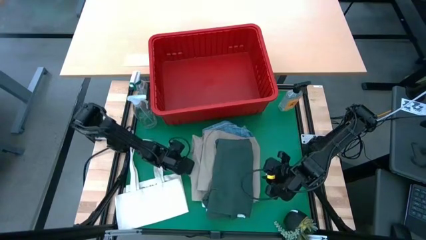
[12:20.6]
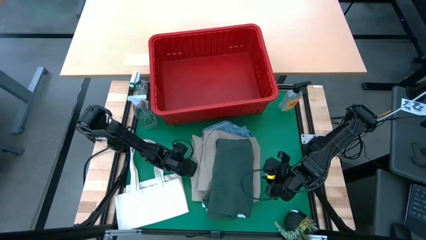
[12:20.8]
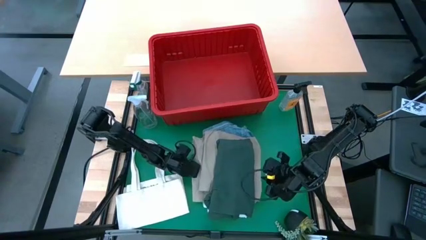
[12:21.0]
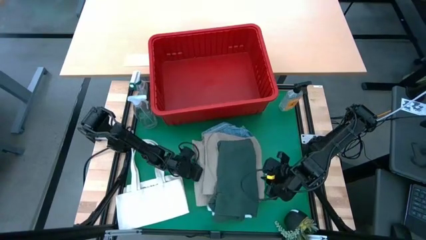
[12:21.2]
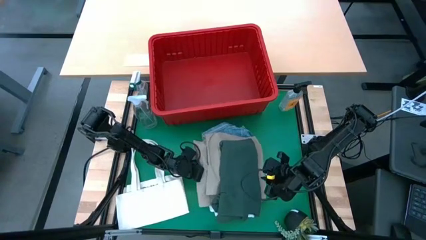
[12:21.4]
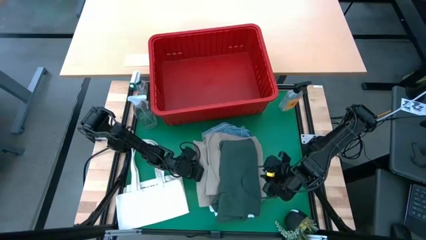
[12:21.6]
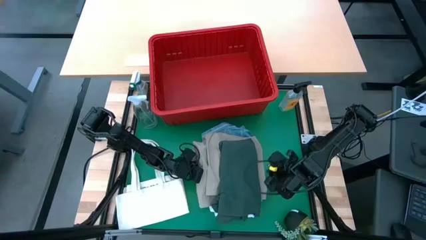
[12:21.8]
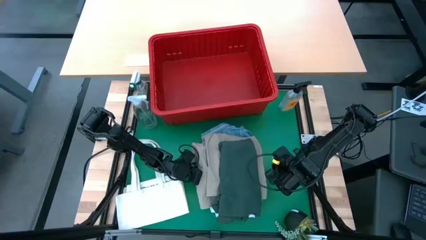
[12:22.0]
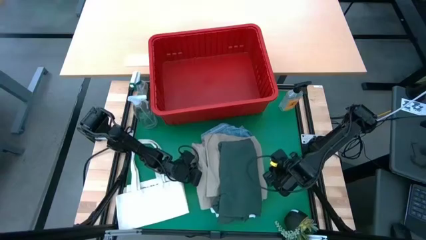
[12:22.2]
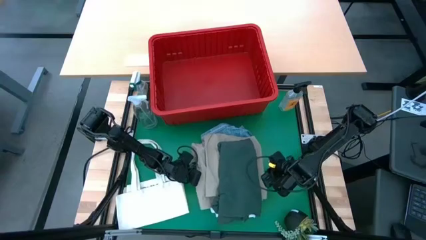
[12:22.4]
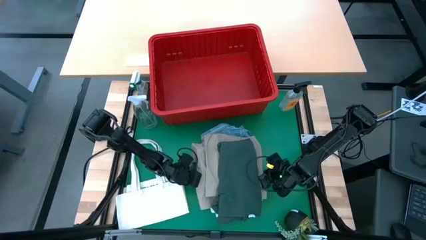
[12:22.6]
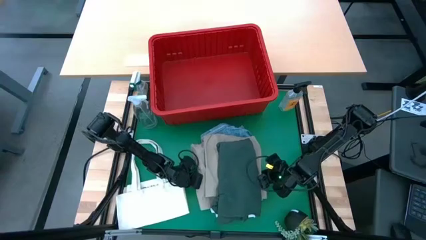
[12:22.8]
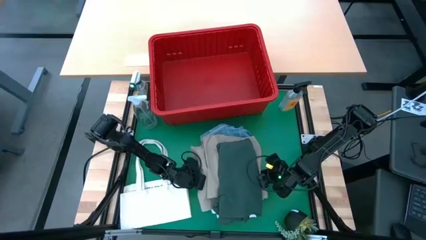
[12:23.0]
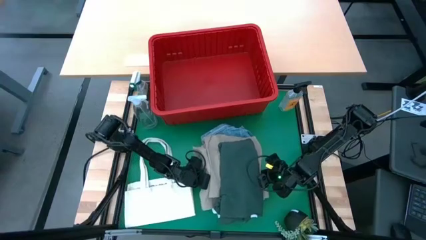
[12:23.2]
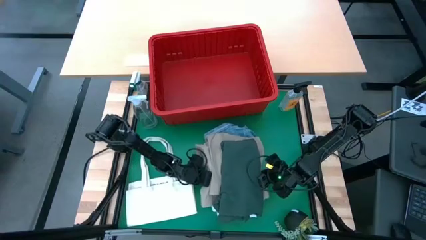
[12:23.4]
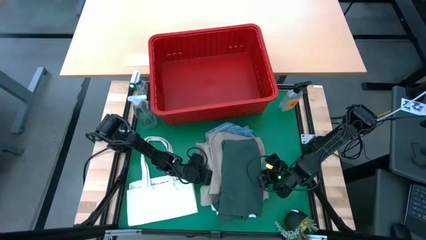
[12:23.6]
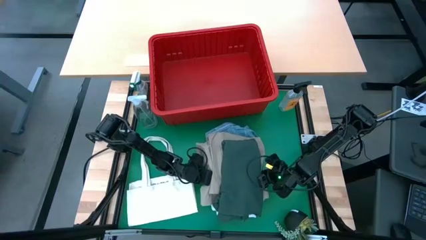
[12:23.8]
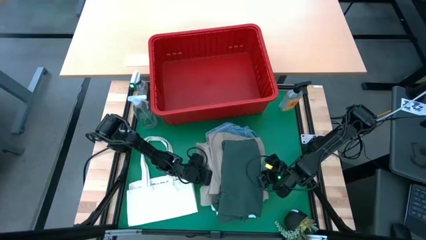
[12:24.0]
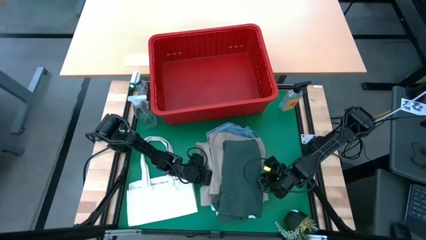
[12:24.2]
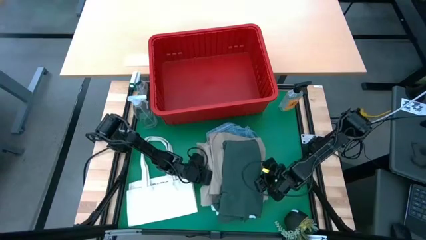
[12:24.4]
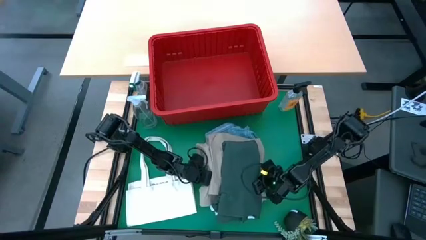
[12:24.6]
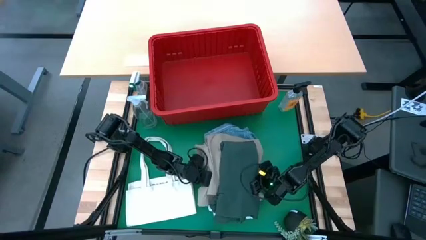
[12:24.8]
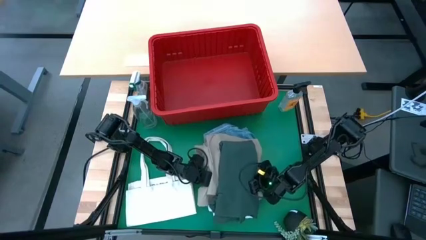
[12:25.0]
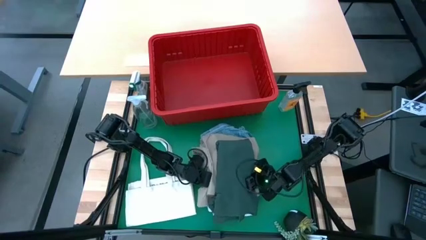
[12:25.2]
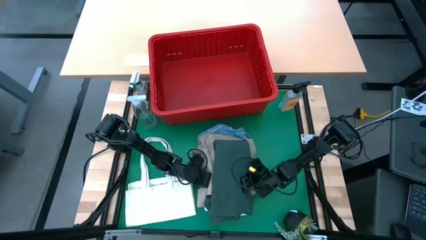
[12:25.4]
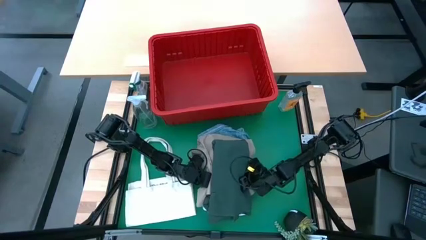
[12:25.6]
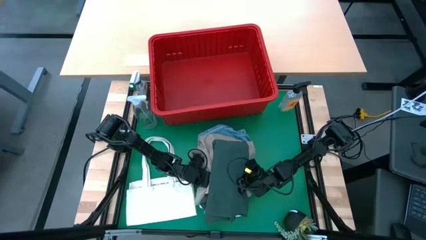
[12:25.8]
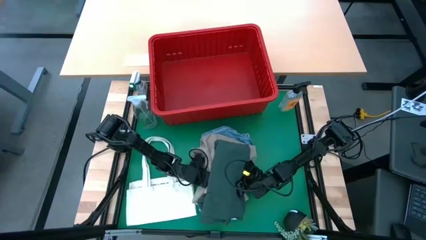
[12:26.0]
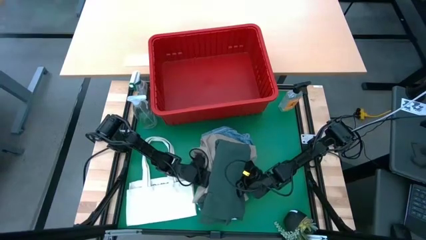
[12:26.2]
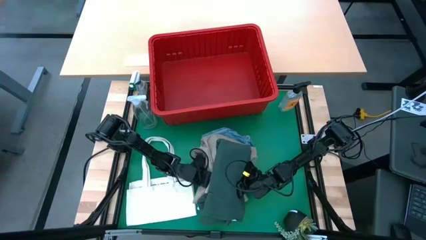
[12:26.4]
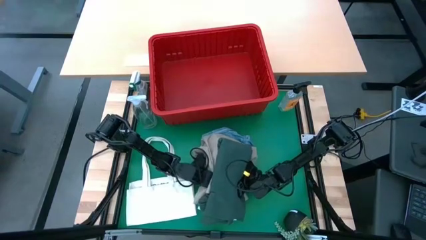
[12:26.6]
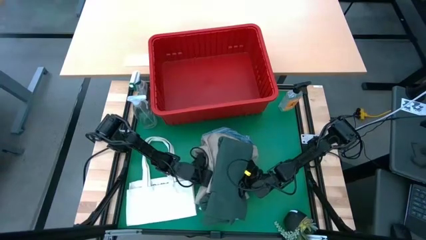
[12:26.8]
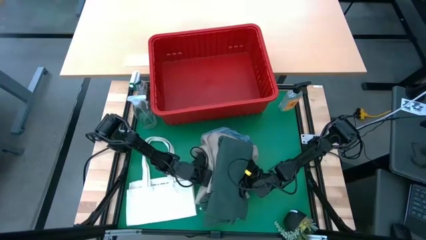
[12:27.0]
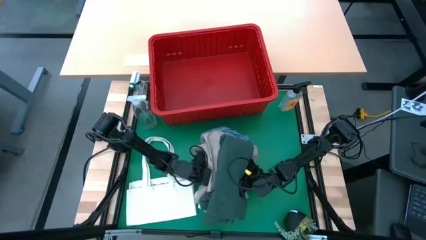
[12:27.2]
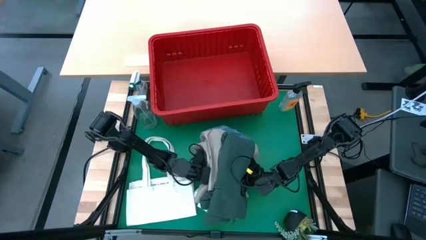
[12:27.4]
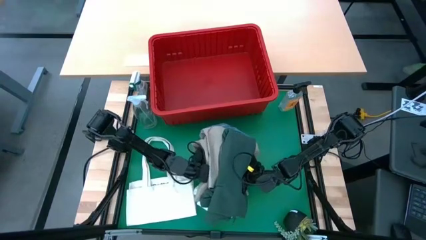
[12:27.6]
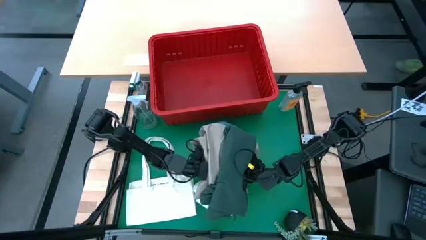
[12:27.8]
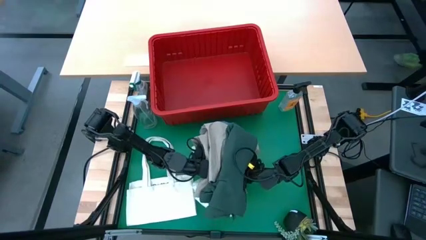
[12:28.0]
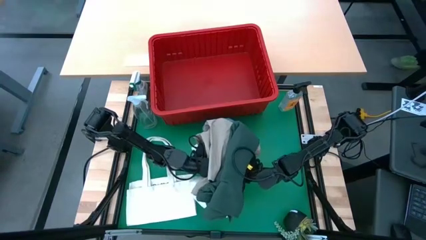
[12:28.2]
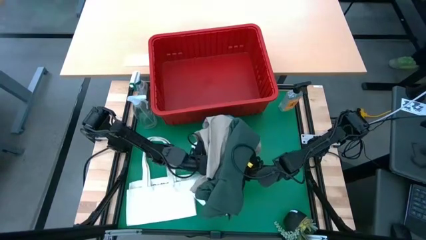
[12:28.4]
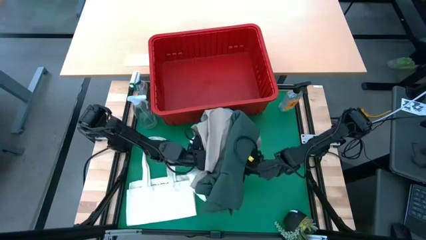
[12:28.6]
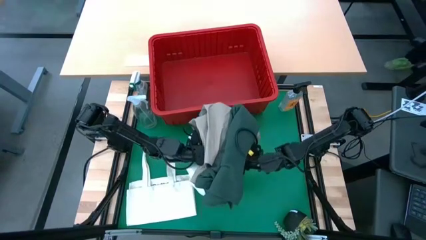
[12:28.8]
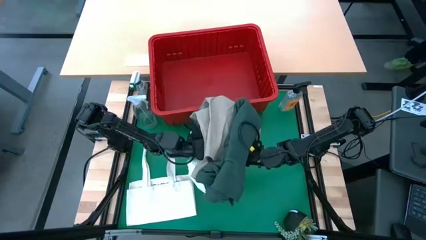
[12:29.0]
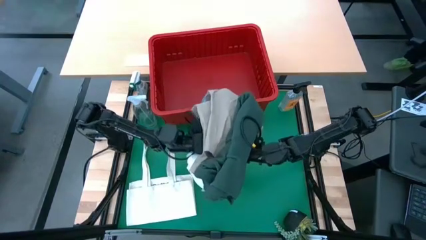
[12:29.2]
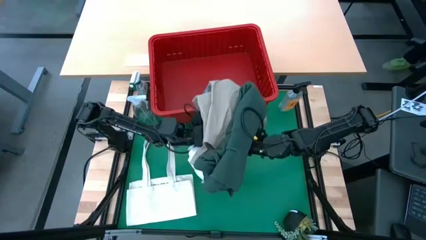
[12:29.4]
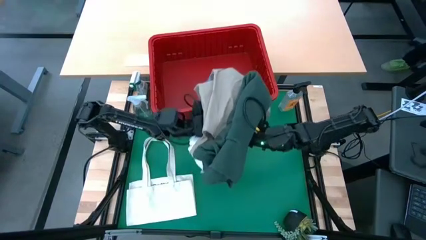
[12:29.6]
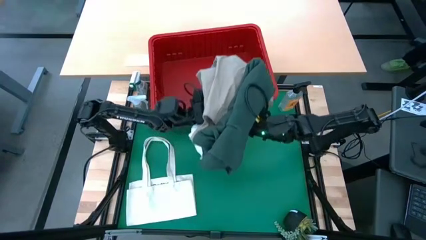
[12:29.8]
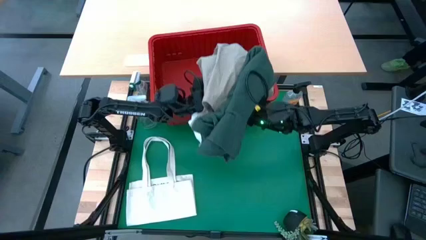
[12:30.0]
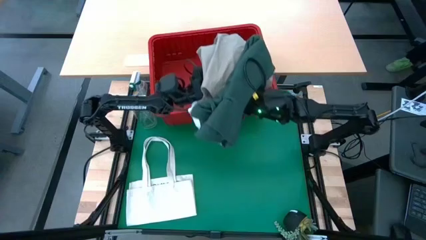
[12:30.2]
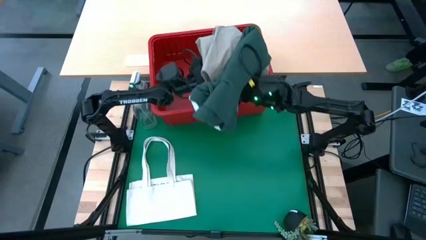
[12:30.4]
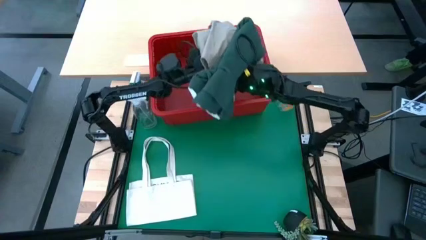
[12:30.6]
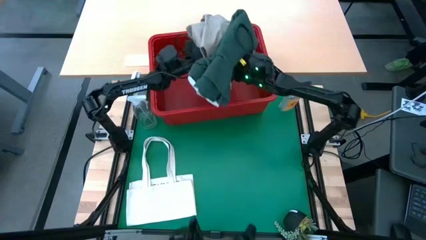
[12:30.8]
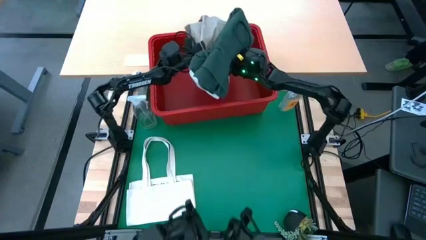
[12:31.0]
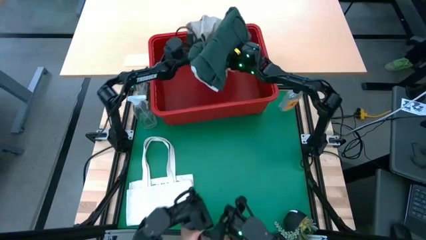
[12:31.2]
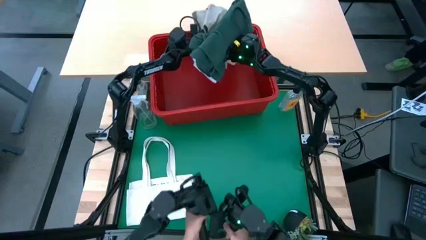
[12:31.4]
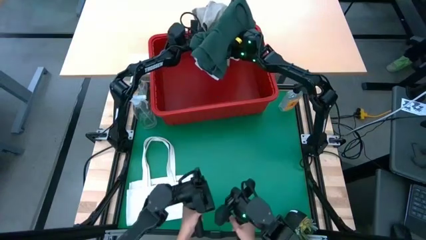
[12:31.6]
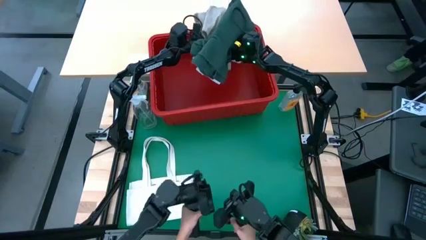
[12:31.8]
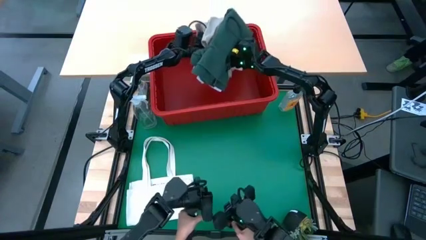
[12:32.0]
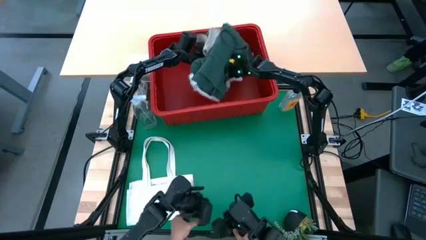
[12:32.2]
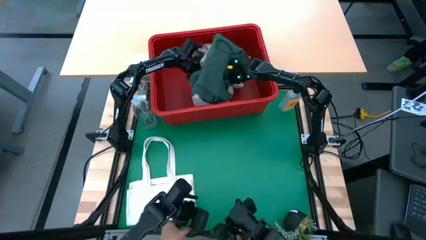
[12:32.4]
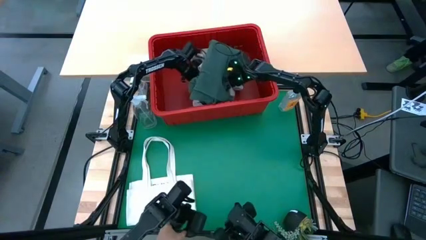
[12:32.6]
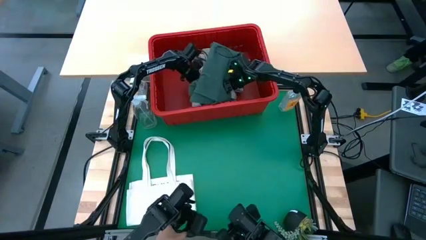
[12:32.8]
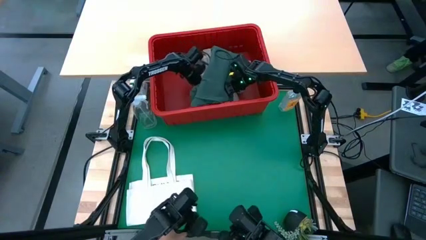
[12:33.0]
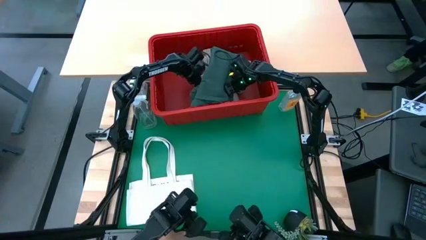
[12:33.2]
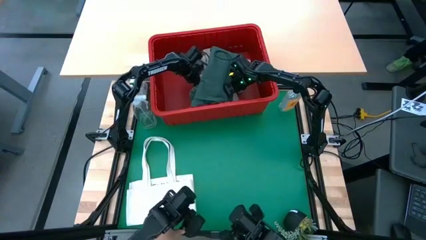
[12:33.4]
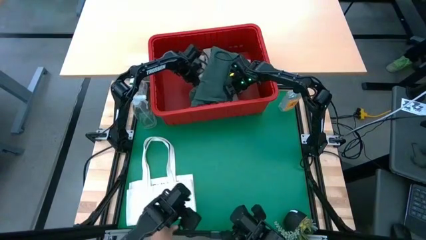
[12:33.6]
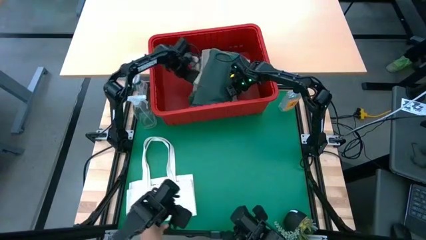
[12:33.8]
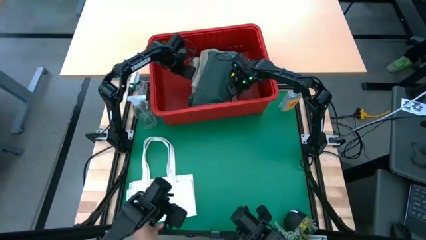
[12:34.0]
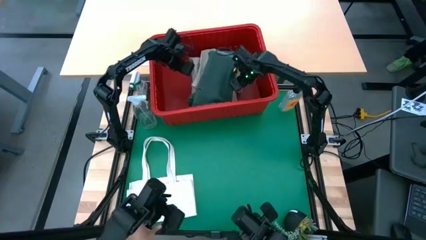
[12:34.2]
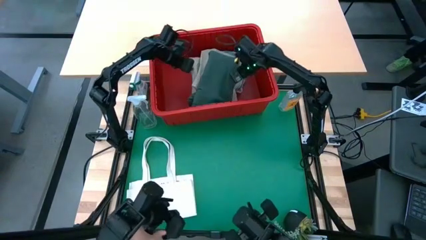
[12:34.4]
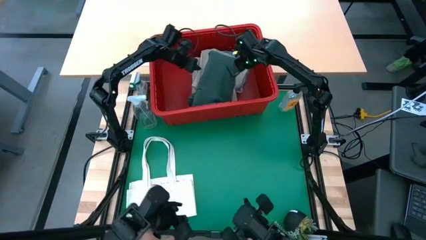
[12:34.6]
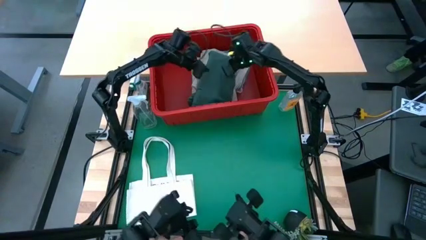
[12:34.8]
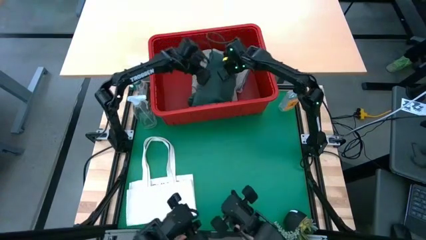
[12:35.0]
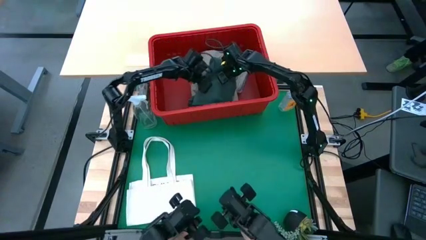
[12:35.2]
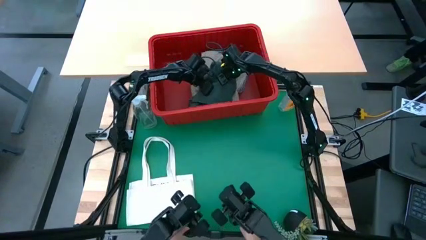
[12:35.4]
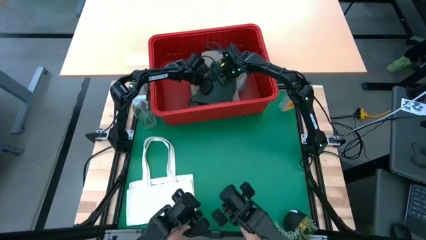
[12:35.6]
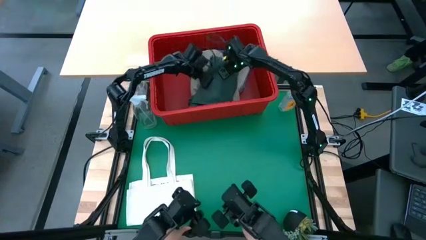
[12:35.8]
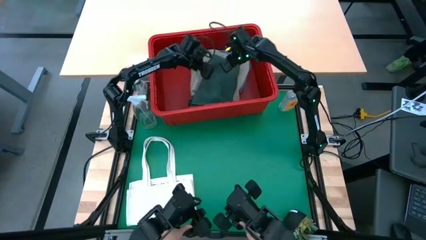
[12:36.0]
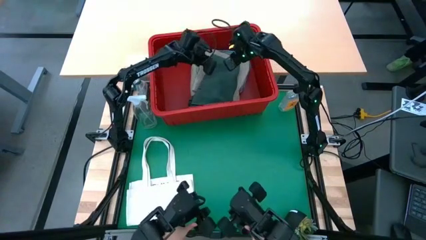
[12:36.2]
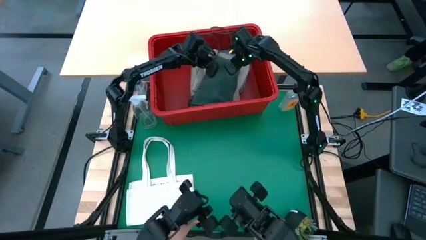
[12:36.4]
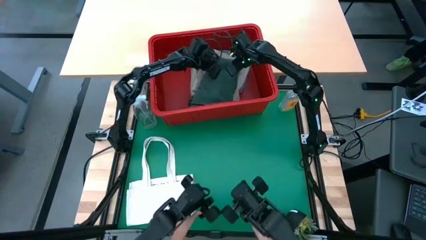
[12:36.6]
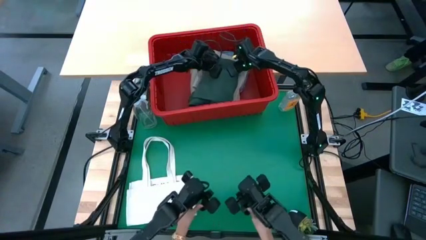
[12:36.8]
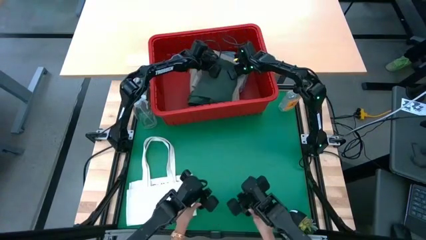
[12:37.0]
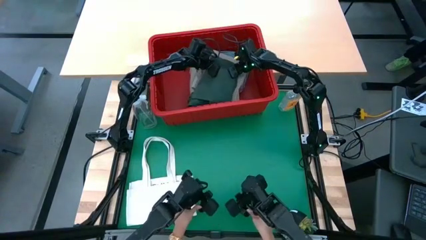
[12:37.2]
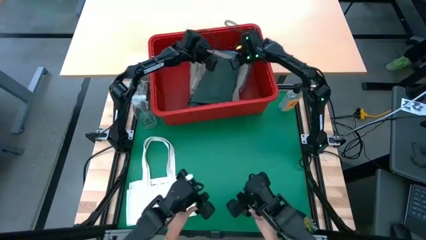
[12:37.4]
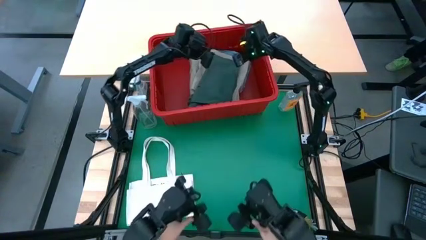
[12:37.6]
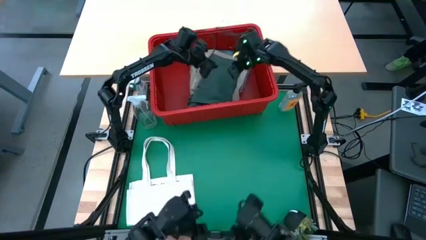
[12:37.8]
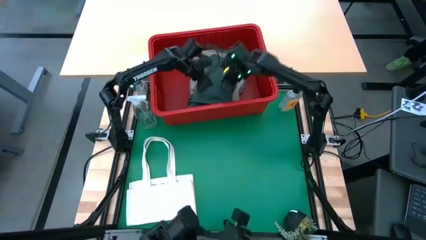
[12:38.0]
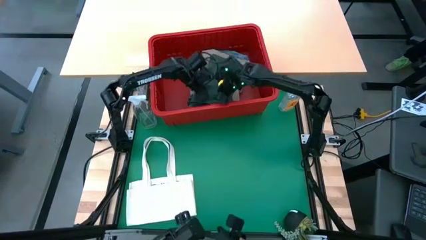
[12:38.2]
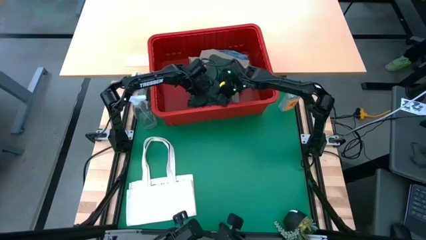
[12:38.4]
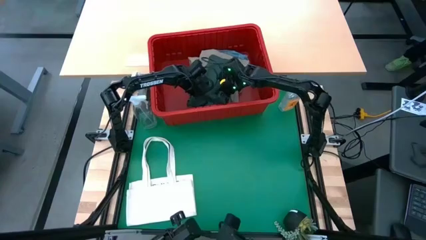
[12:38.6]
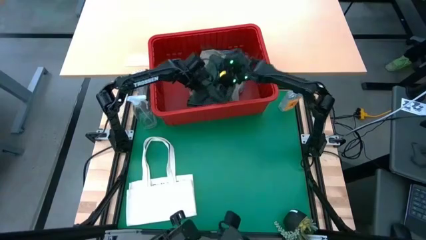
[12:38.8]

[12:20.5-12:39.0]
Task: Fold Laundry from Bin
Put the stack of folded clothes into the red bin
